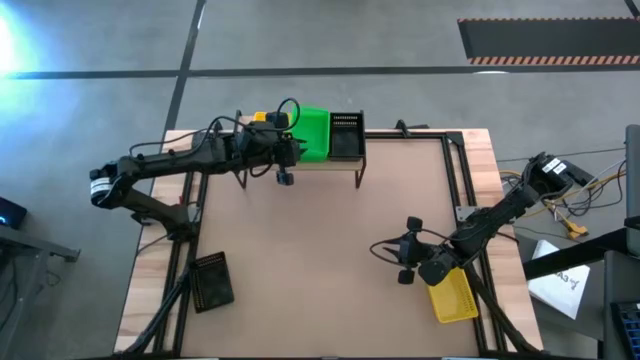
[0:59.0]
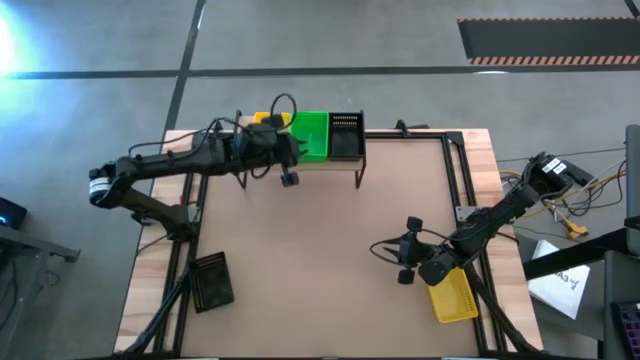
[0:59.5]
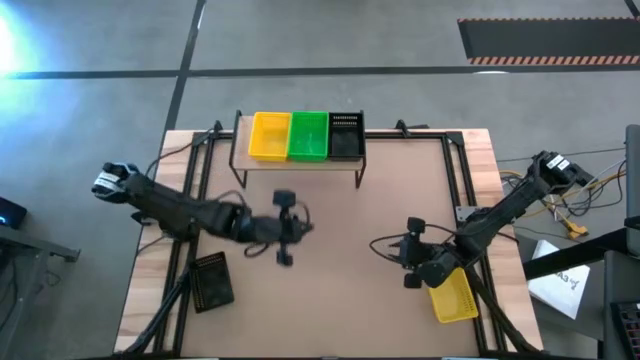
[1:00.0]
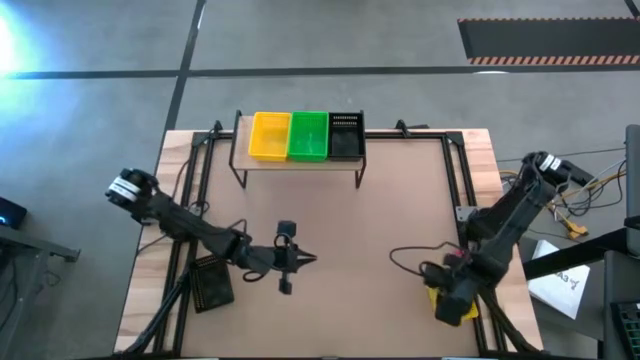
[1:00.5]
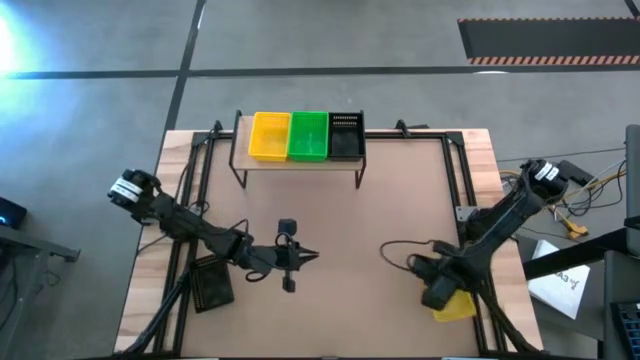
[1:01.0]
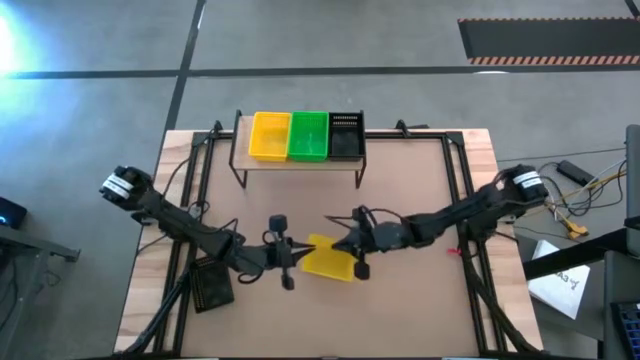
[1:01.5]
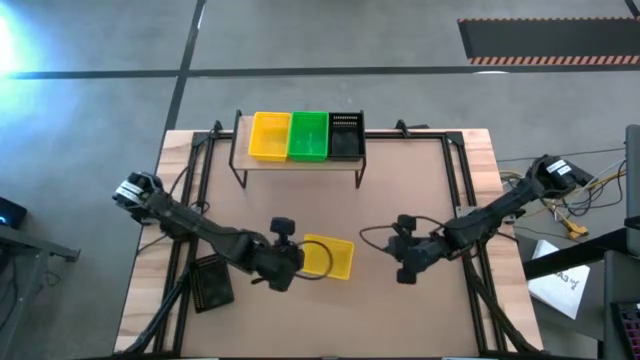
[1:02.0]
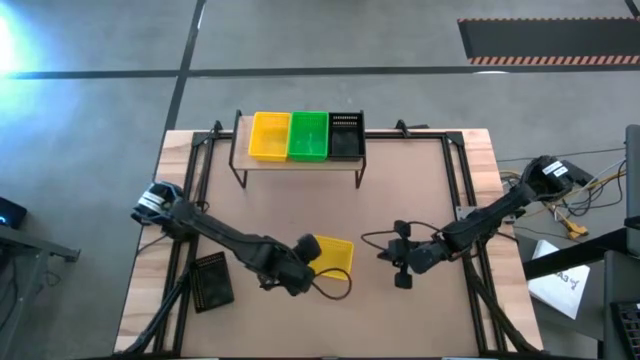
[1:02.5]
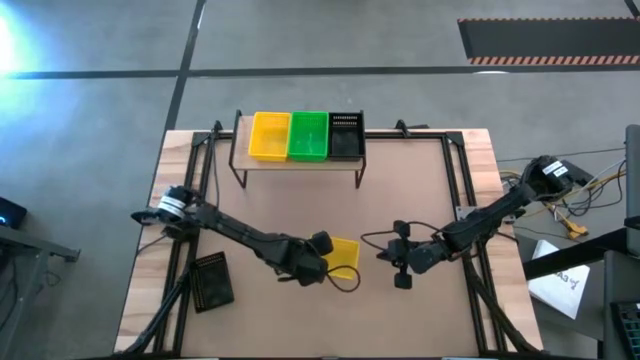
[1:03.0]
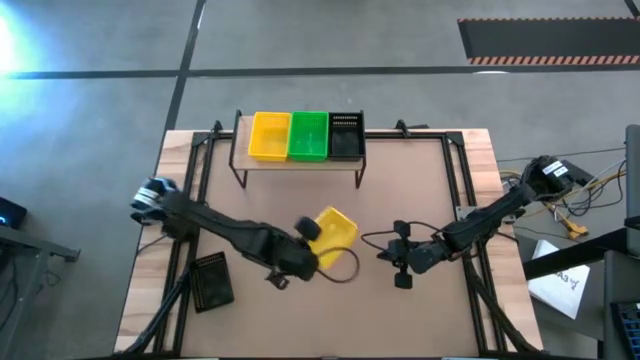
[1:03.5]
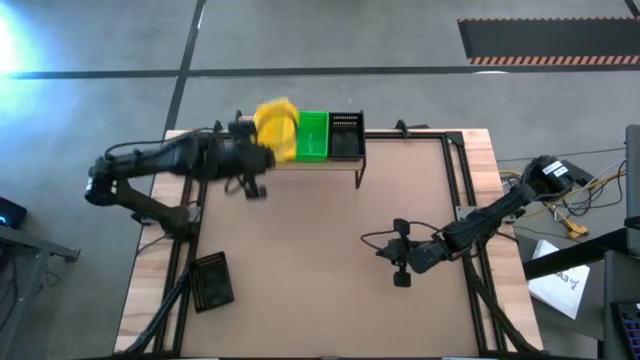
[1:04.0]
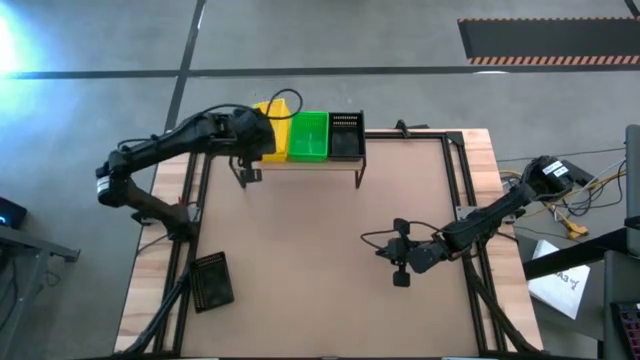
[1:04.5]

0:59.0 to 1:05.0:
Task: Stack baskets on shelf by color
Stack the yellow basket on the other yellow basket on the shelf

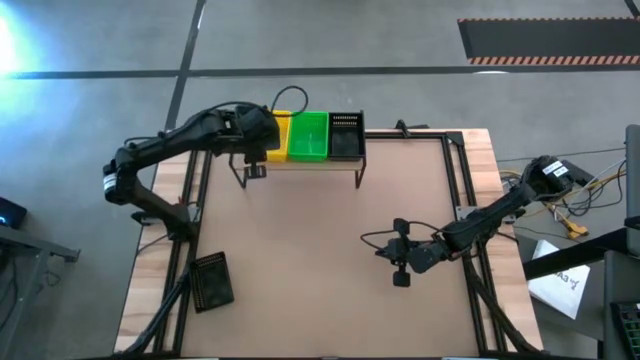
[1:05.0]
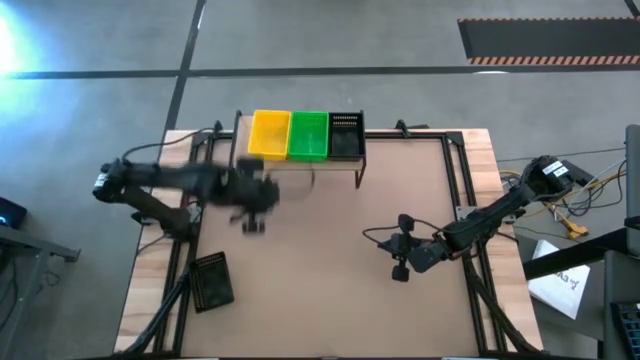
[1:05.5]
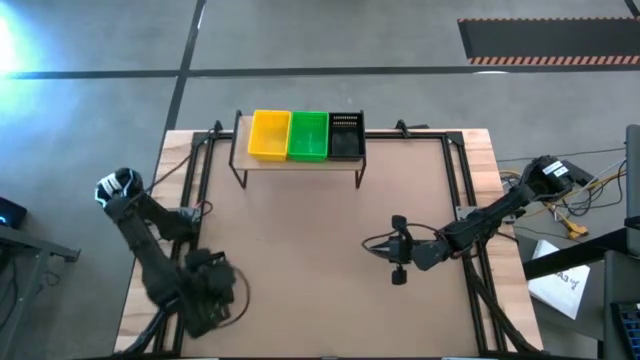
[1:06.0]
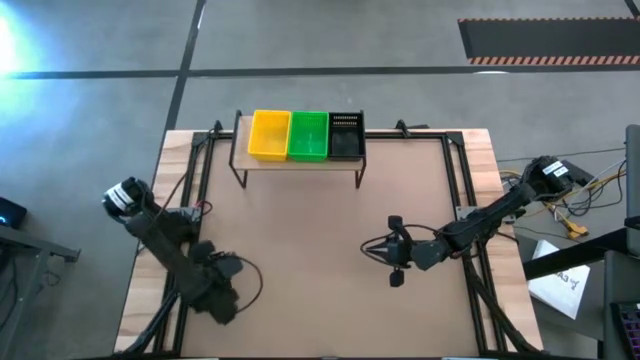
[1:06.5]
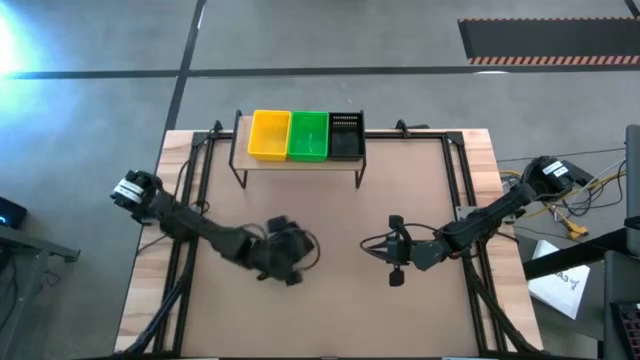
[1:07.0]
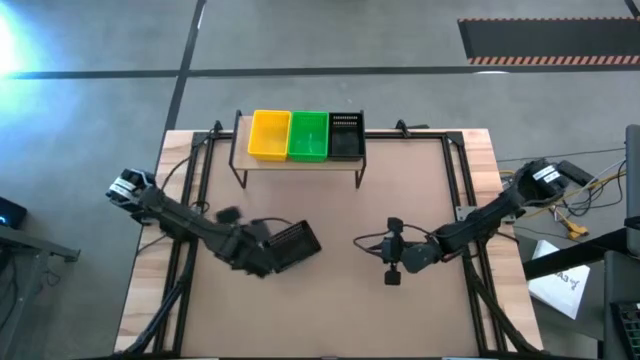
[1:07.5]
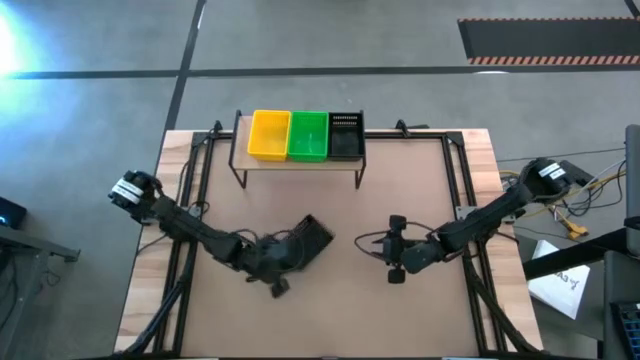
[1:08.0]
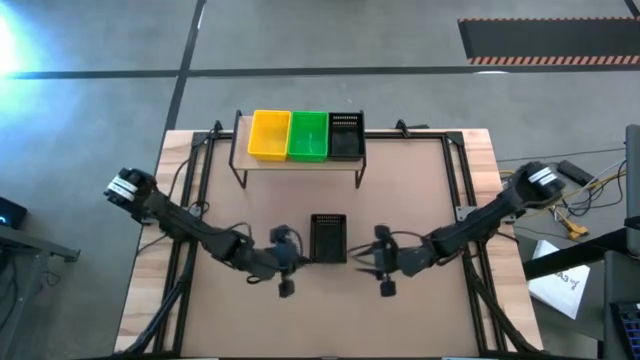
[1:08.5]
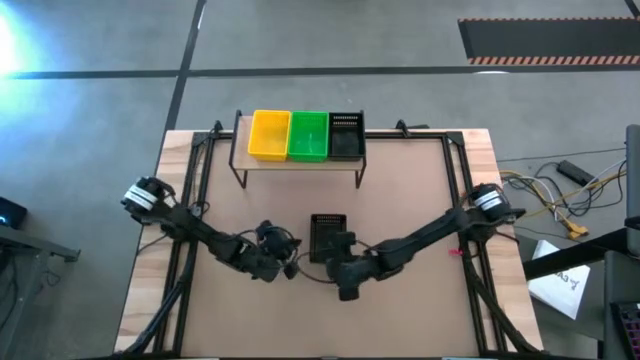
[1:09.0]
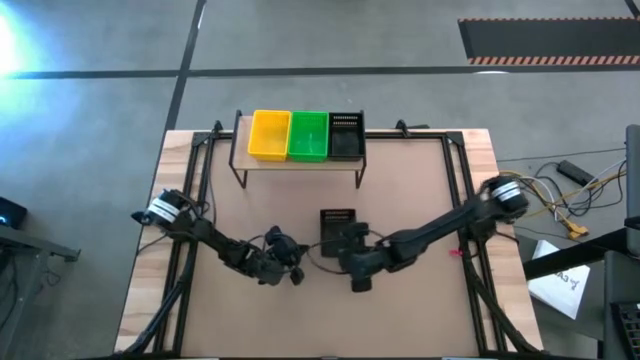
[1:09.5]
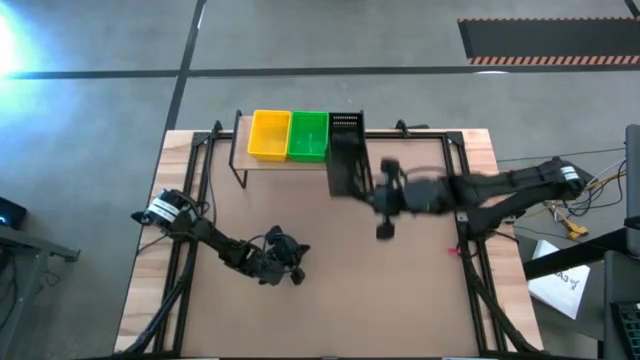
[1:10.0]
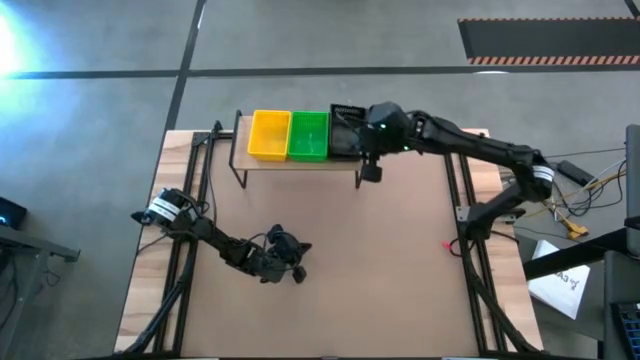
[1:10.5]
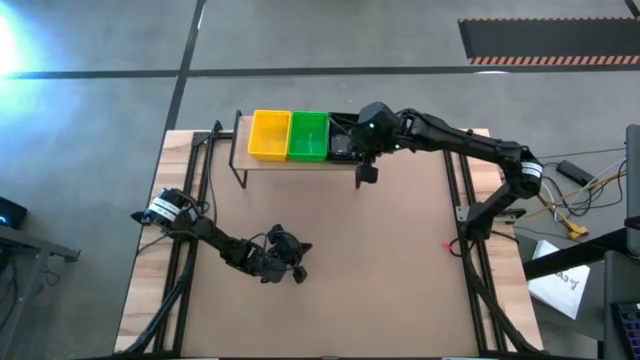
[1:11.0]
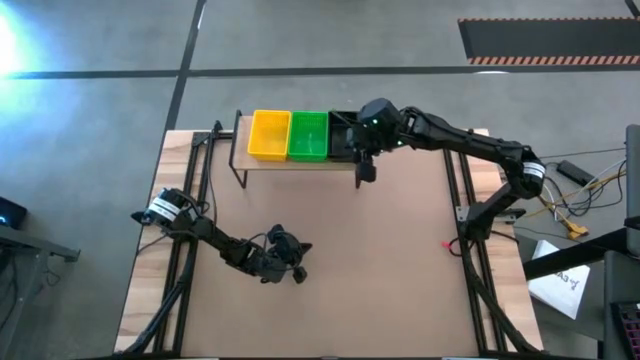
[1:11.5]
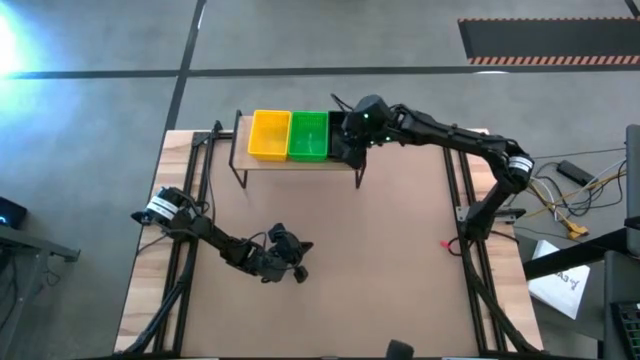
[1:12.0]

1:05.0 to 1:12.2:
Stack the black basket on the other black basket on the shelf

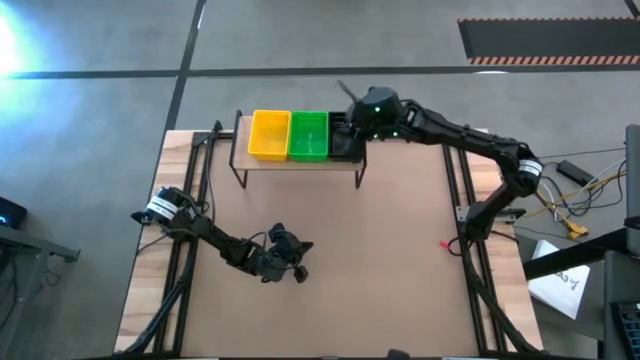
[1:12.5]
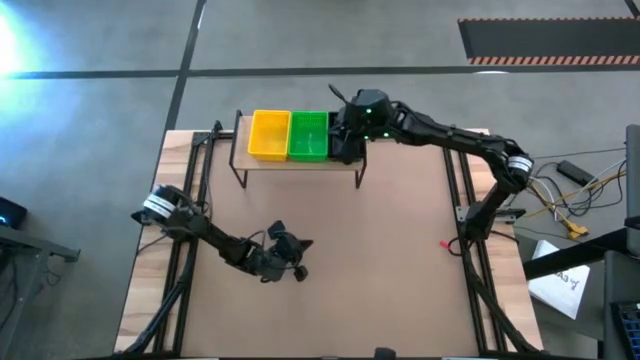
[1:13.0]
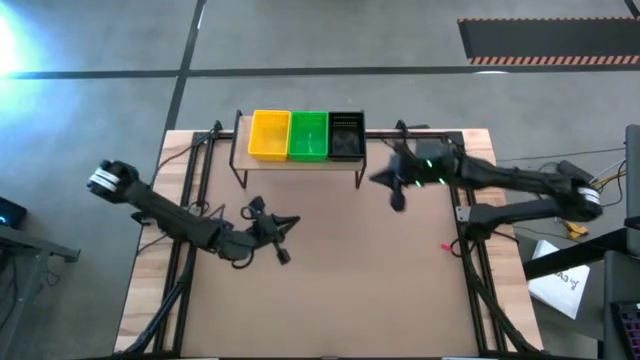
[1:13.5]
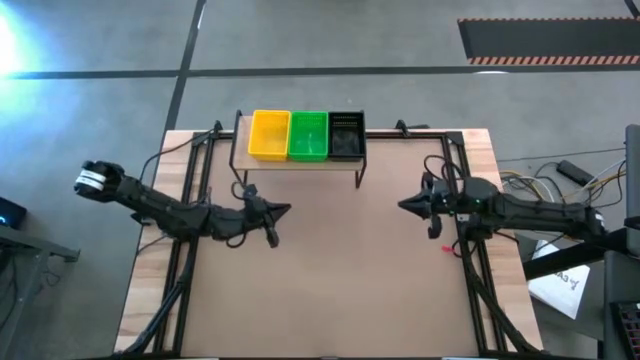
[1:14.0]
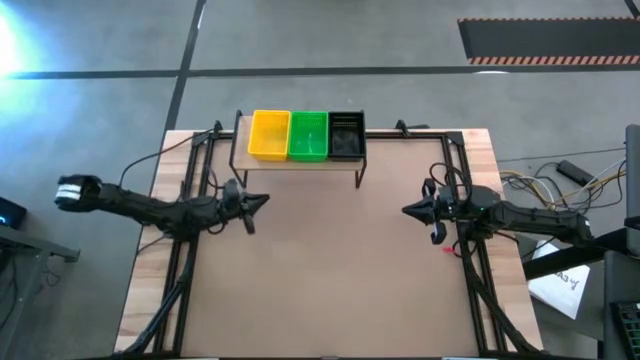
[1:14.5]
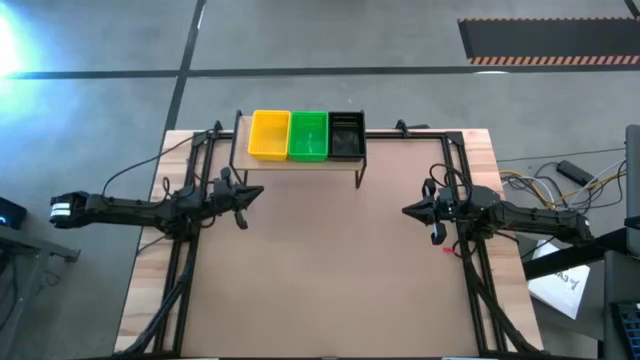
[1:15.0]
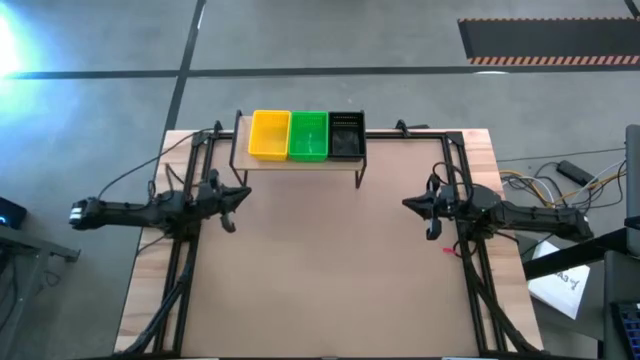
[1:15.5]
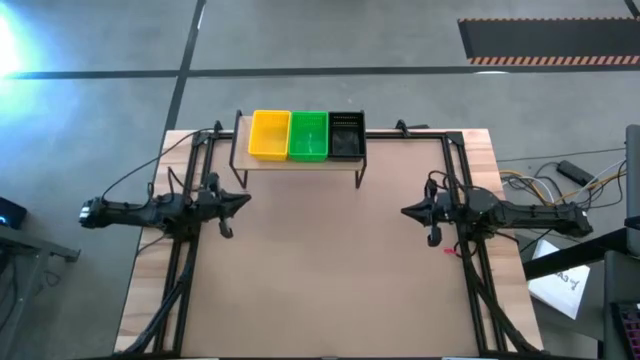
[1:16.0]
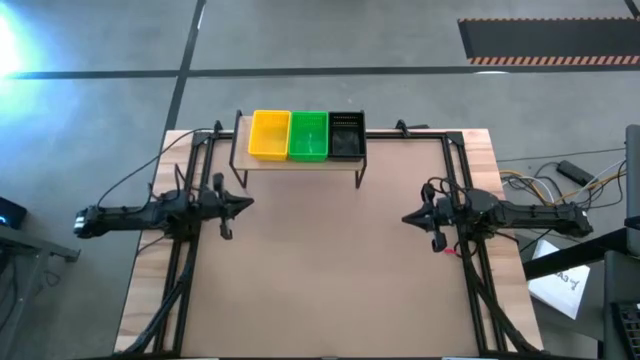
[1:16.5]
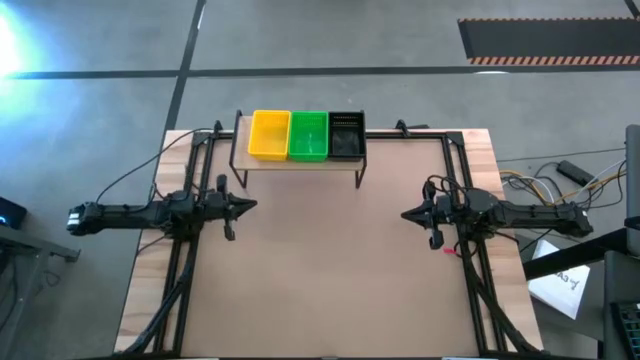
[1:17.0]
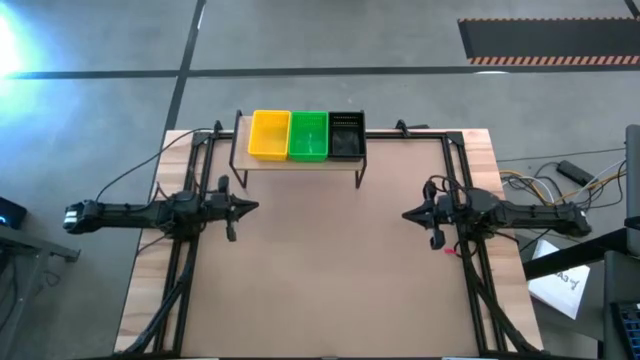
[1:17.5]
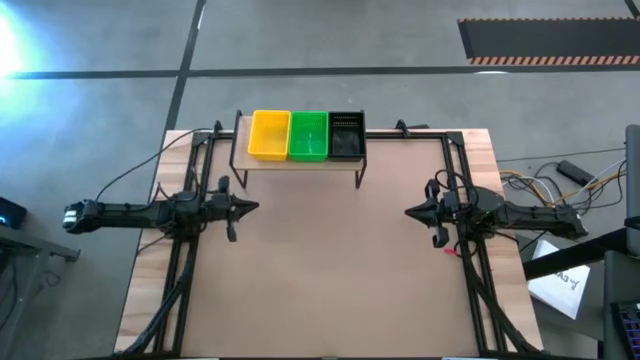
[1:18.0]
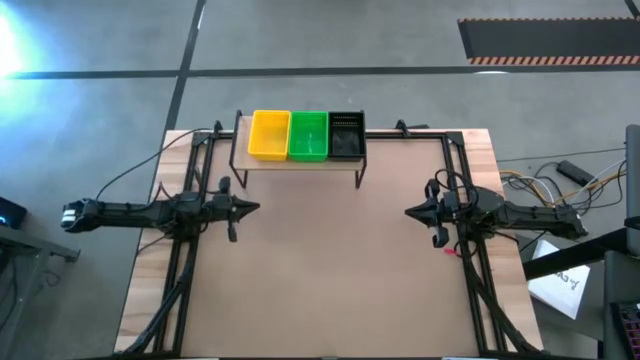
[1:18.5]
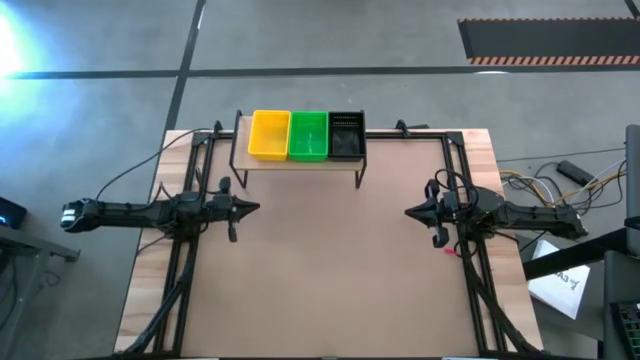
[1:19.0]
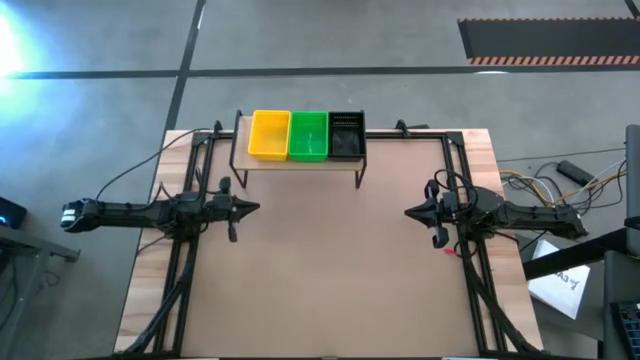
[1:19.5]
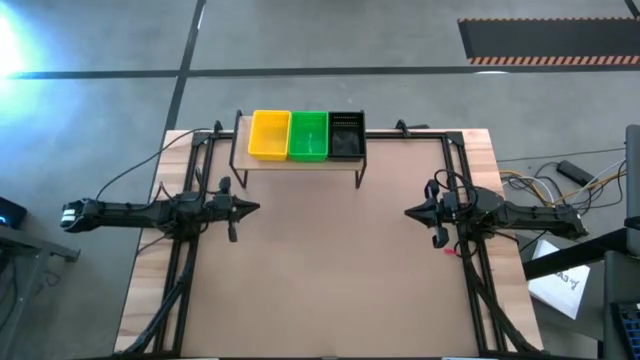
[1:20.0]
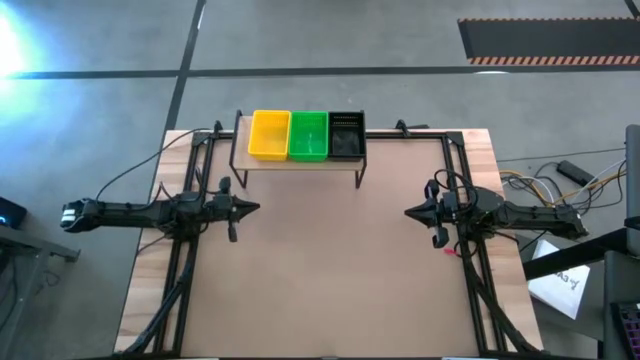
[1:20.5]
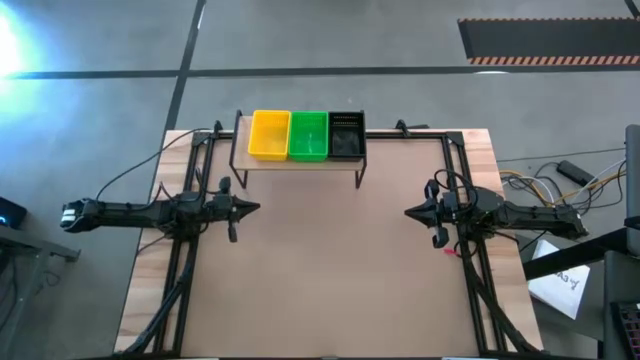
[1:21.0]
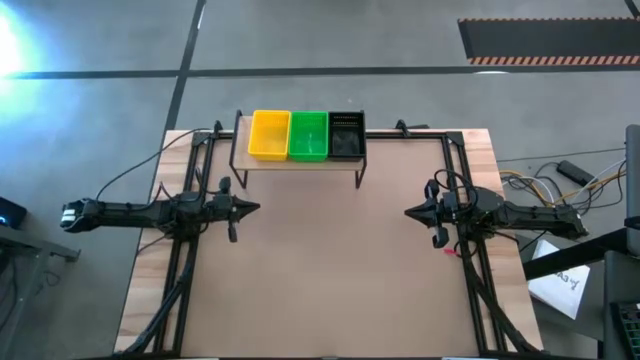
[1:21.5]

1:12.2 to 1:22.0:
Return to Home Position
